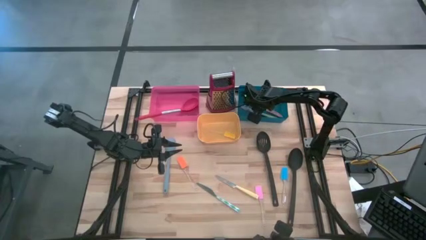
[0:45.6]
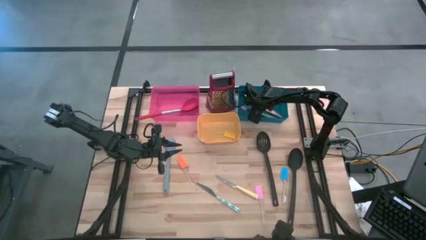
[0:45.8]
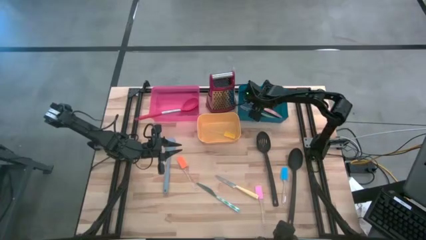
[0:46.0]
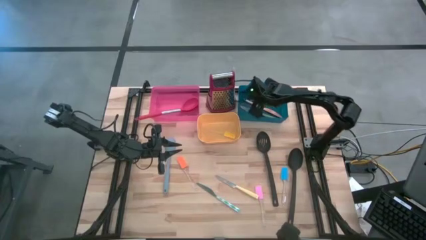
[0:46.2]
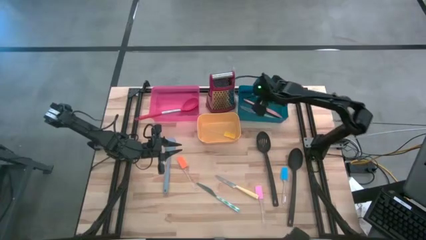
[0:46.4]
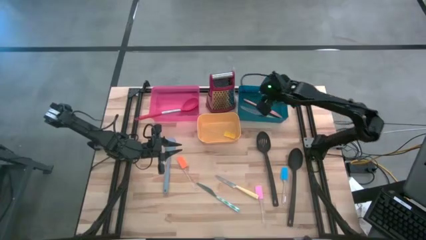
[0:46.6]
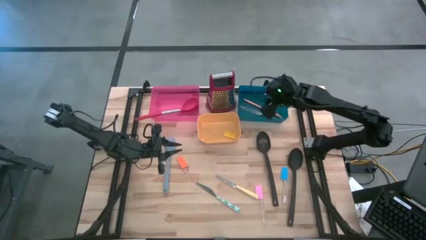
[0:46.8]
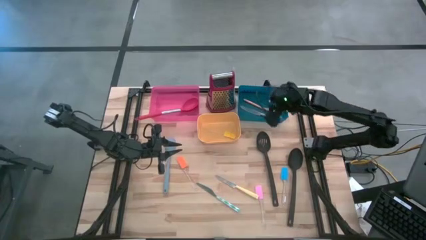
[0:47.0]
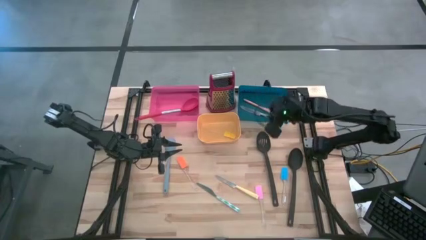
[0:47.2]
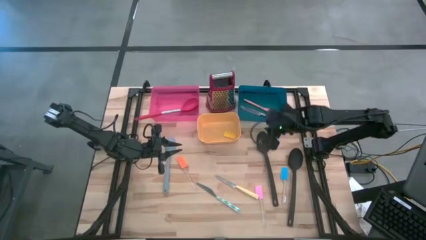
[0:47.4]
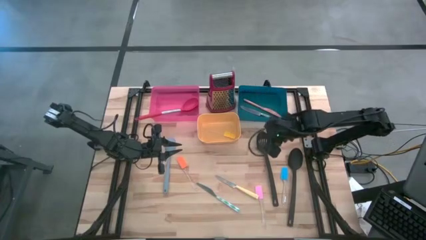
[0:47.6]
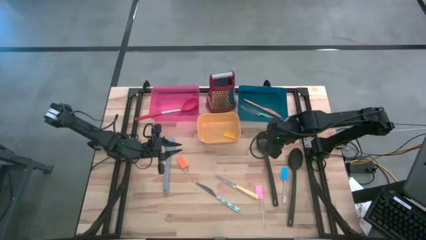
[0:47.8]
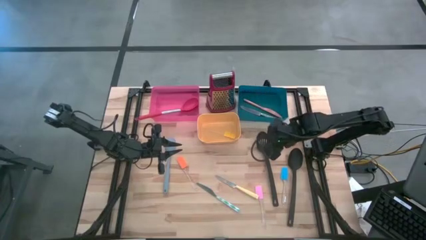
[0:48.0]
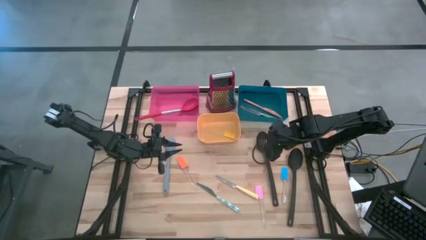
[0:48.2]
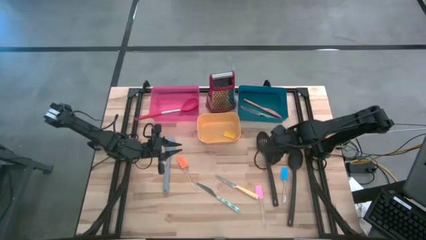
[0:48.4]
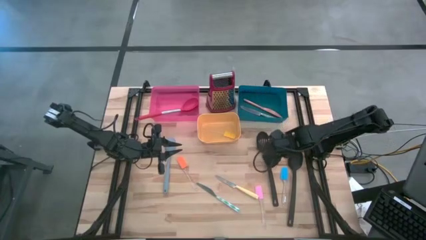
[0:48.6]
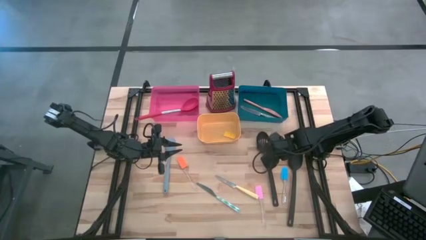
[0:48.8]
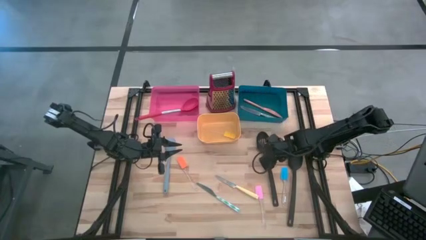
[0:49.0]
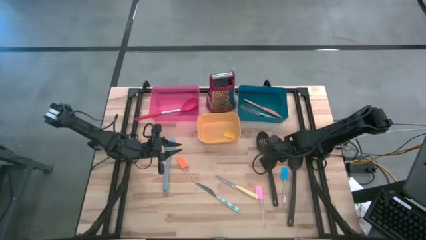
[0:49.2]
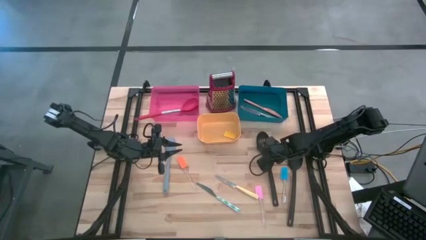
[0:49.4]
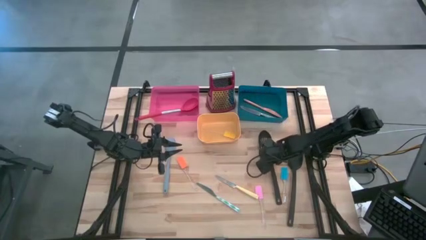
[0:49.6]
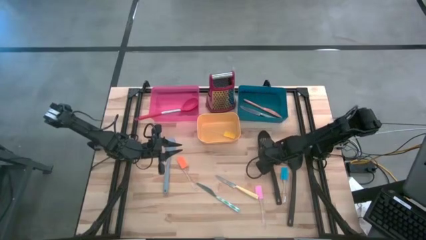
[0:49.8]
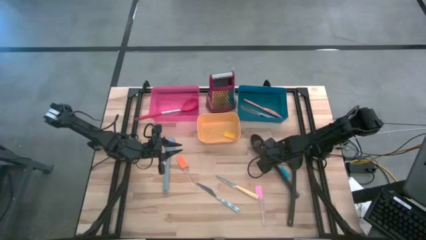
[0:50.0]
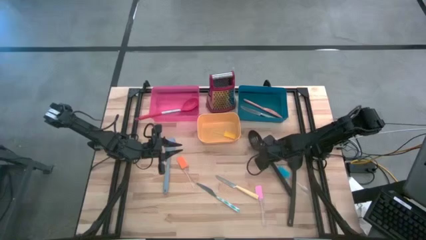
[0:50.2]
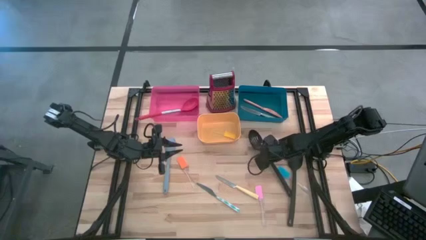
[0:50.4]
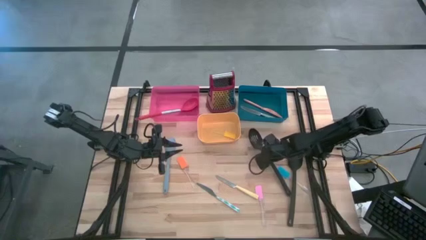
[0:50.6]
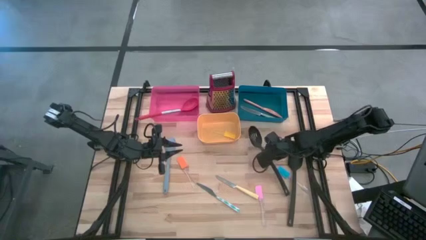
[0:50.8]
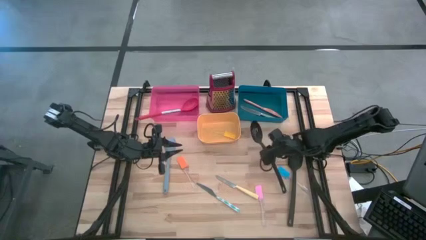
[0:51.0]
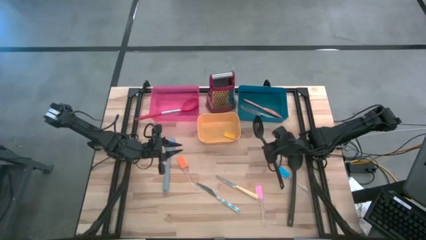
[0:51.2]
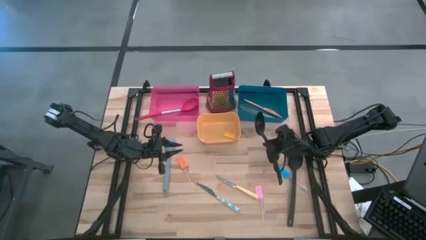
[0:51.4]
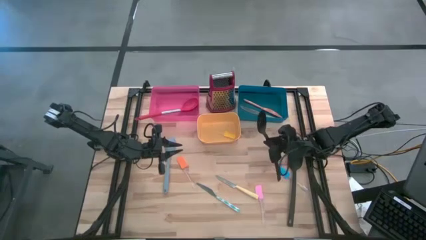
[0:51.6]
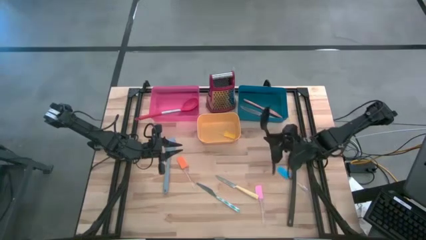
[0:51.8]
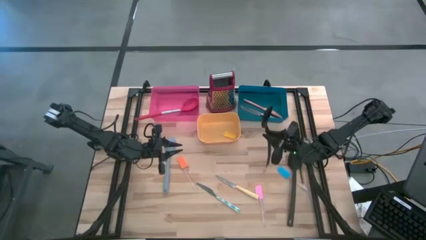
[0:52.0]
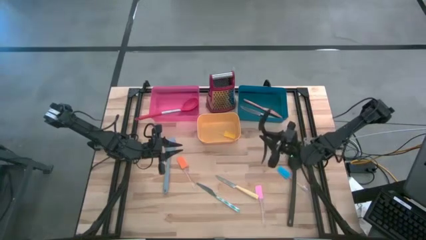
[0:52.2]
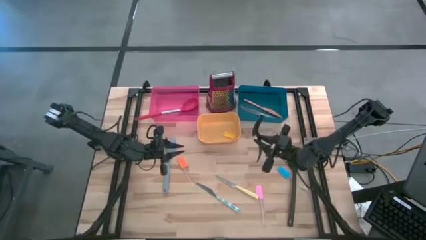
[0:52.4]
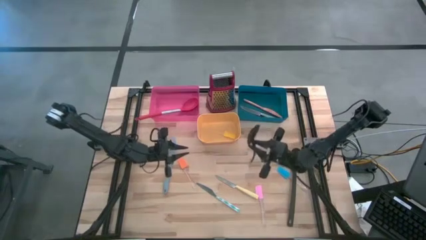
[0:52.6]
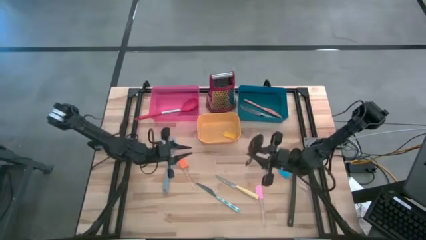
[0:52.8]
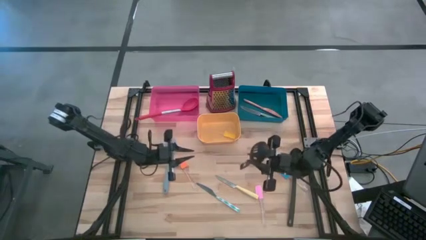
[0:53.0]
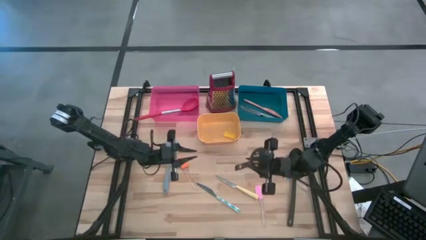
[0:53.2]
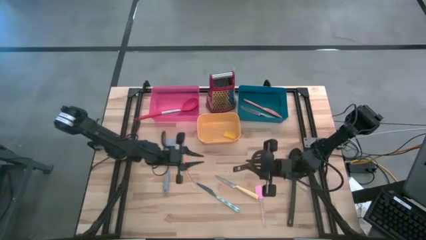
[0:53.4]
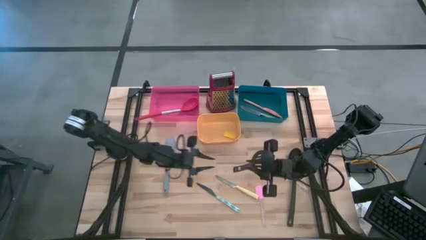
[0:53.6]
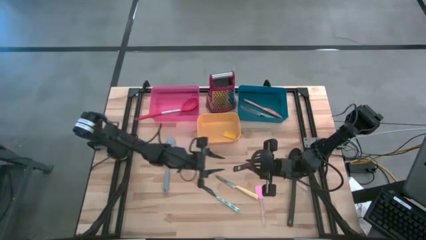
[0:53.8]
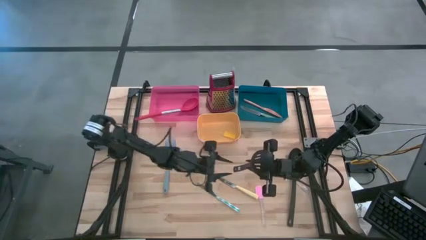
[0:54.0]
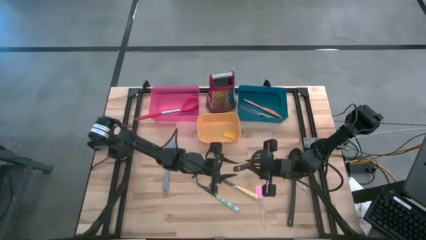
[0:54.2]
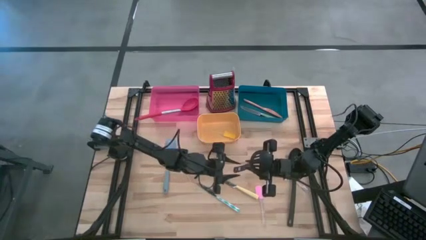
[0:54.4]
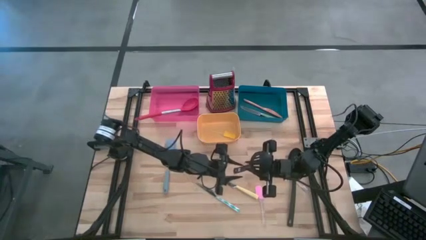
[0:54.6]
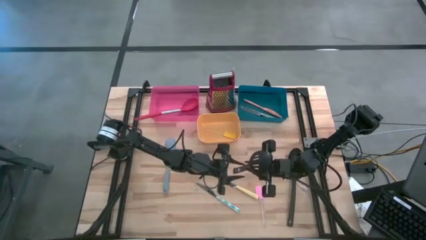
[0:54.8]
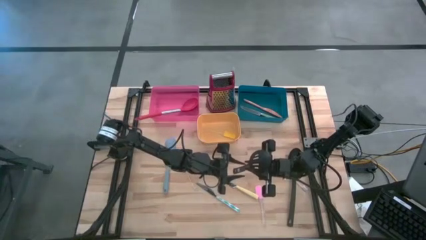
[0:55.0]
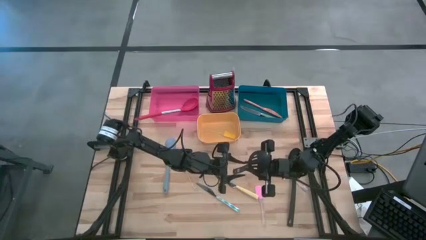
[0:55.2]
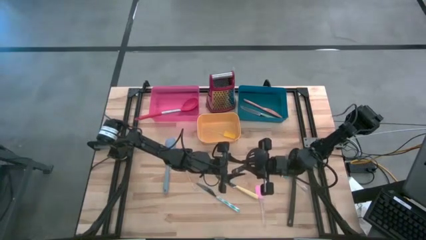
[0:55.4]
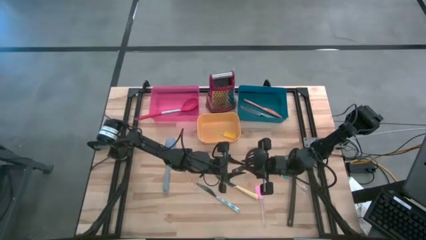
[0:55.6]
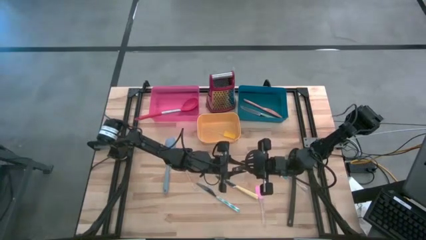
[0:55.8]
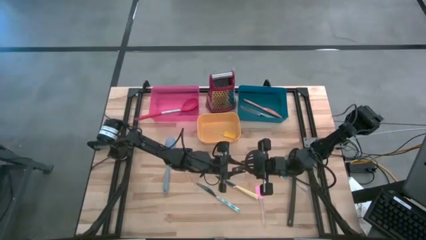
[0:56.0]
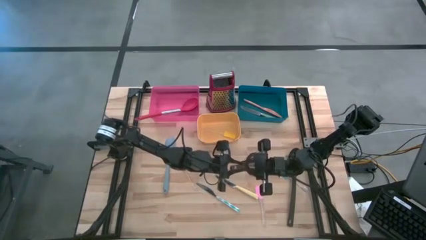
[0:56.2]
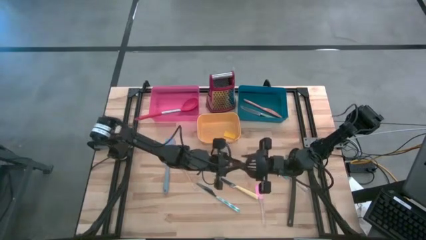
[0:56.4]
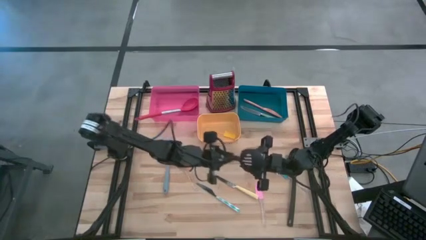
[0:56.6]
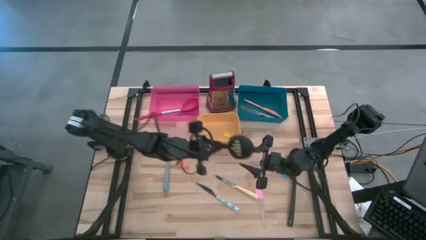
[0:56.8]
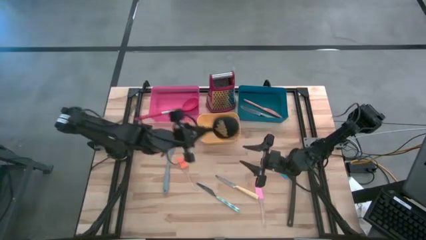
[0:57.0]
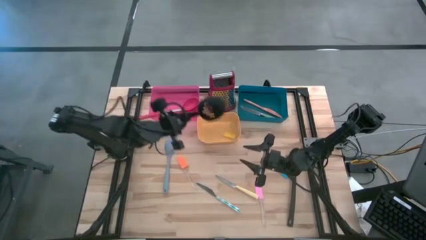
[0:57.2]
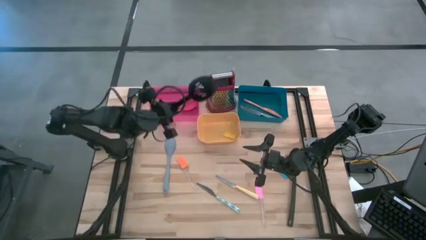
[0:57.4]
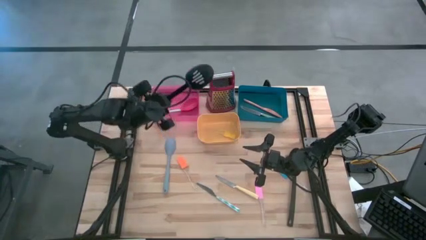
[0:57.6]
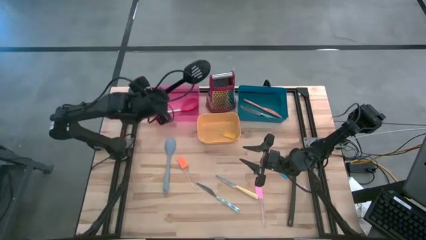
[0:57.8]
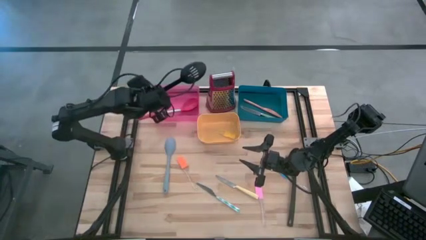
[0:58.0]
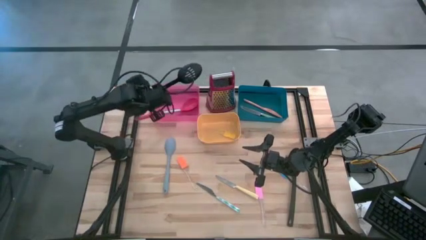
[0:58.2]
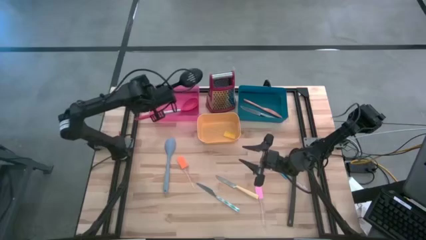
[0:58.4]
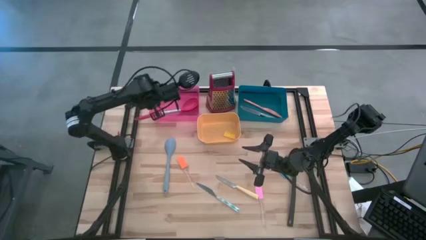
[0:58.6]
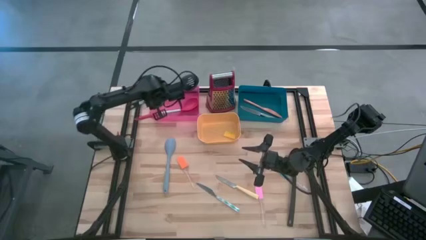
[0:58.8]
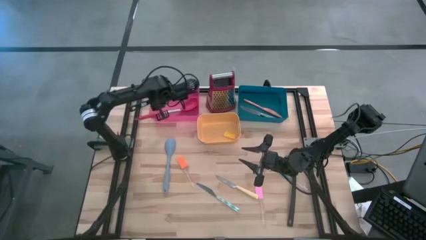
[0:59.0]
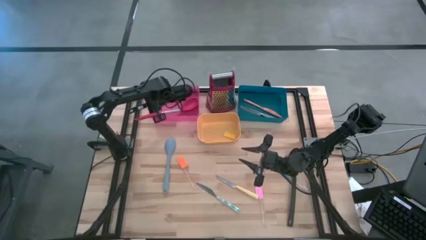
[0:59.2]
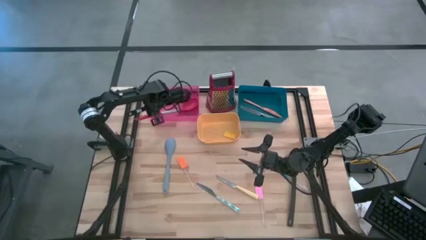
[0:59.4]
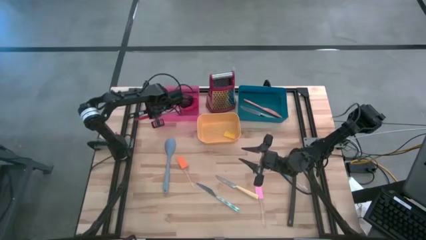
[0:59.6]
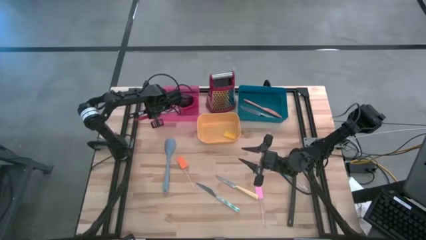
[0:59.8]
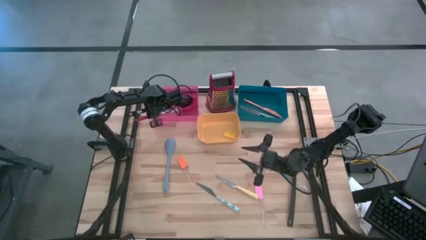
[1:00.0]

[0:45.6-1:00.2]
Task: Pick & Place Kitchen Items
Put the left black serving spoon into the red bin
